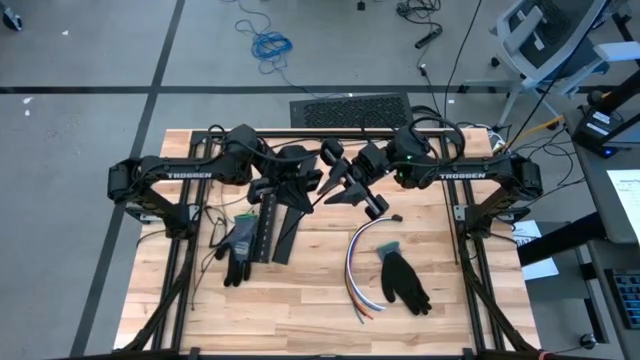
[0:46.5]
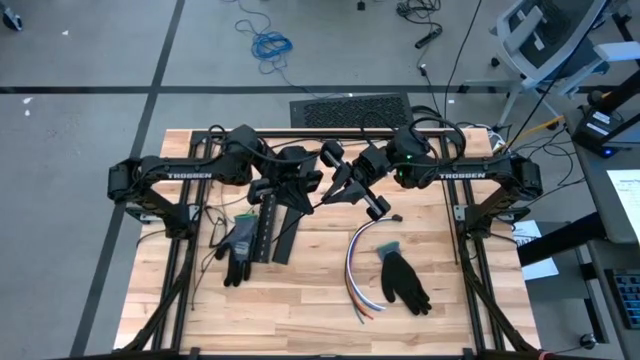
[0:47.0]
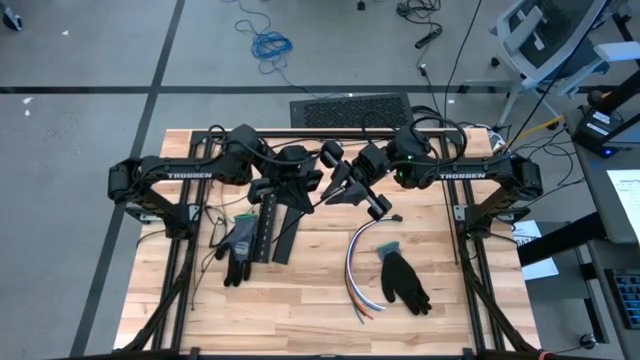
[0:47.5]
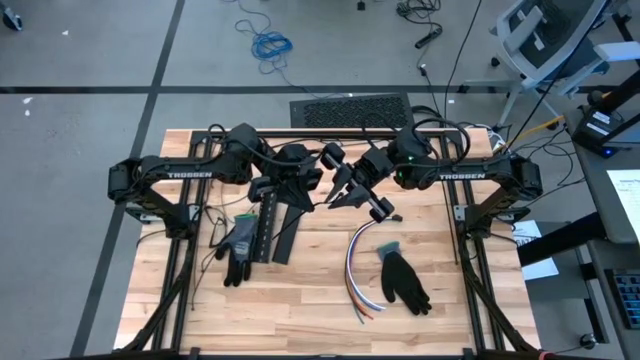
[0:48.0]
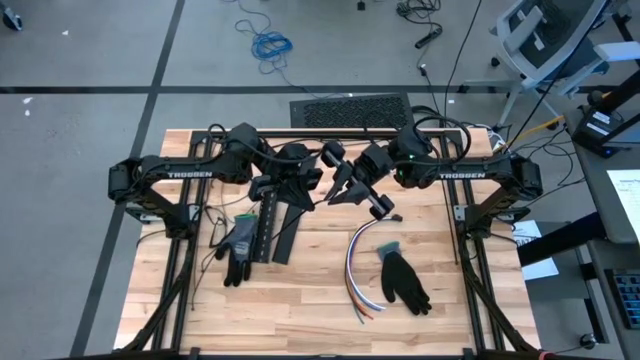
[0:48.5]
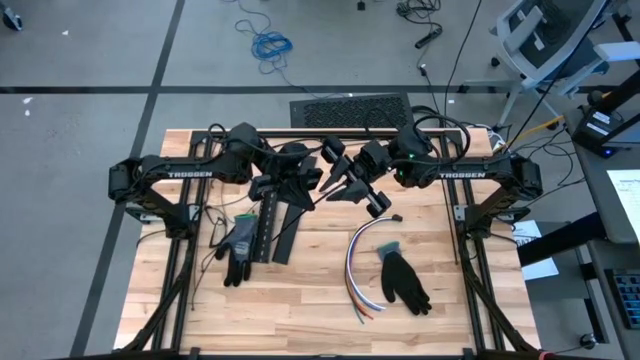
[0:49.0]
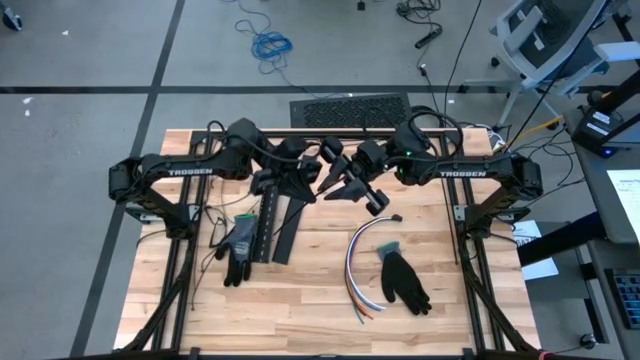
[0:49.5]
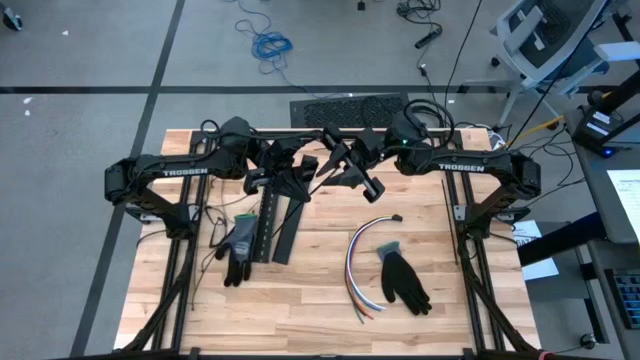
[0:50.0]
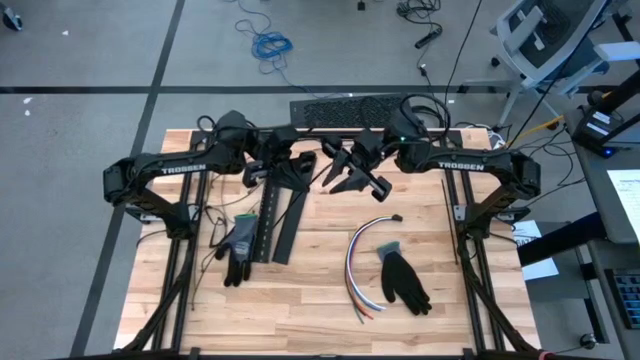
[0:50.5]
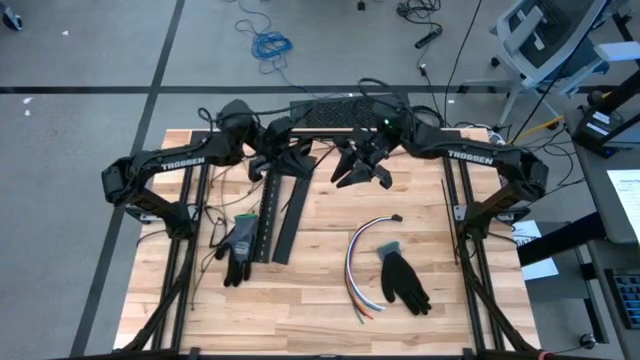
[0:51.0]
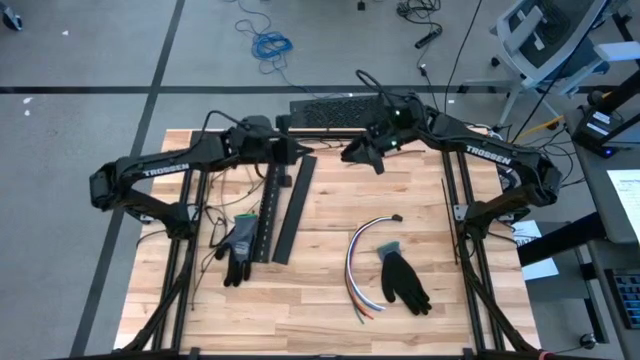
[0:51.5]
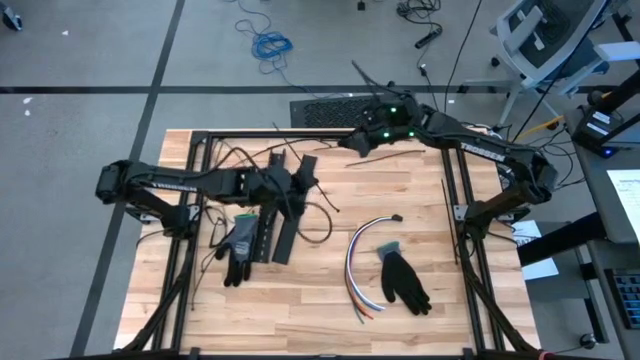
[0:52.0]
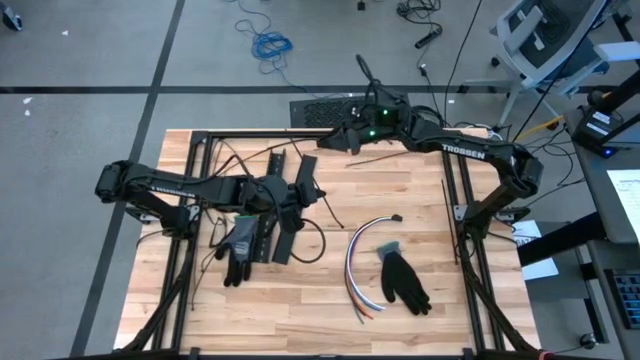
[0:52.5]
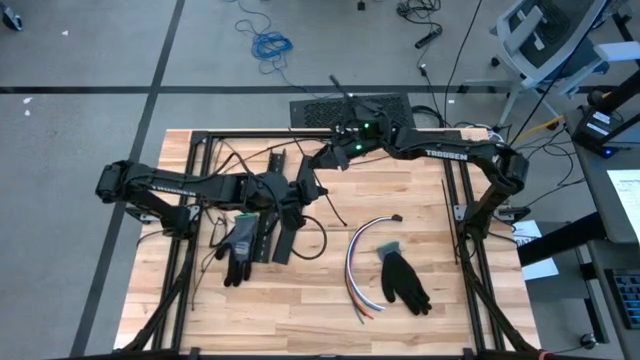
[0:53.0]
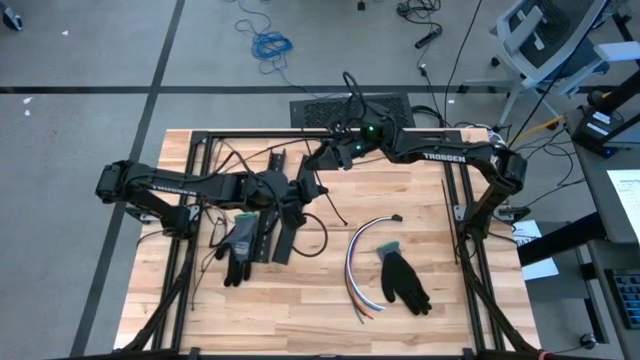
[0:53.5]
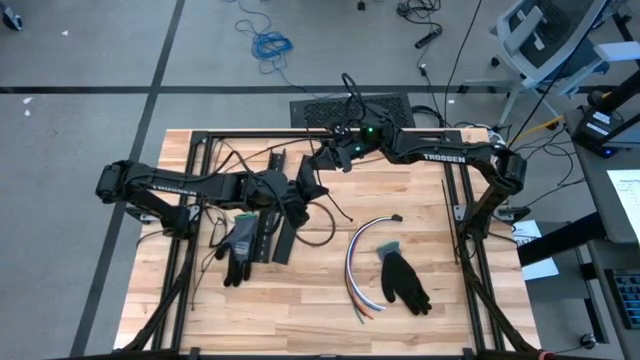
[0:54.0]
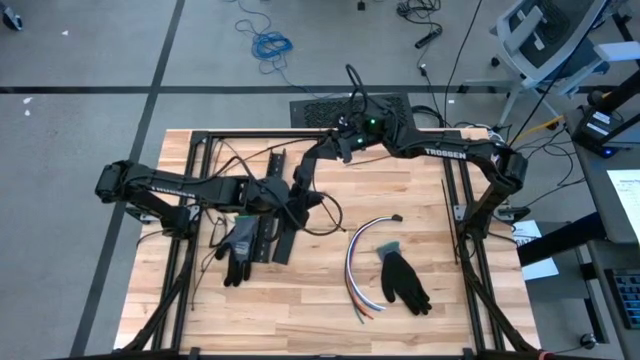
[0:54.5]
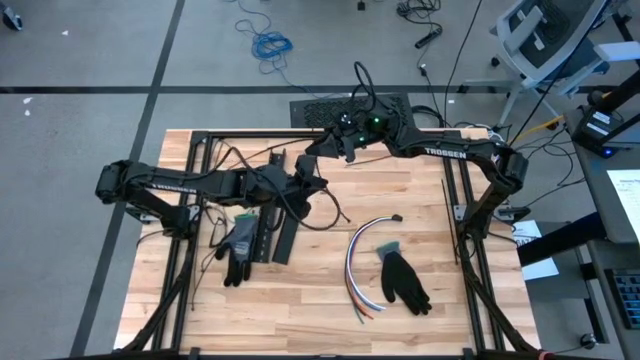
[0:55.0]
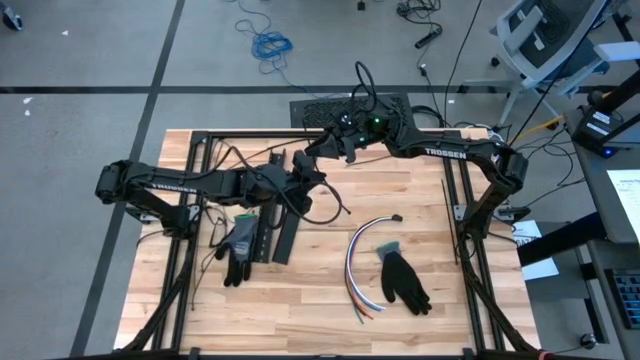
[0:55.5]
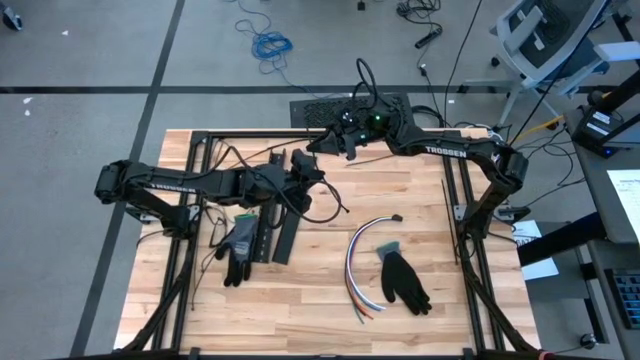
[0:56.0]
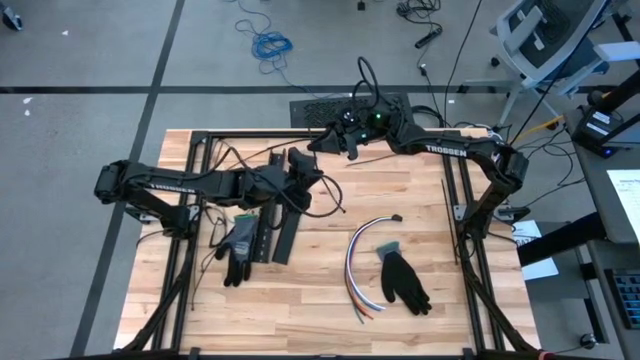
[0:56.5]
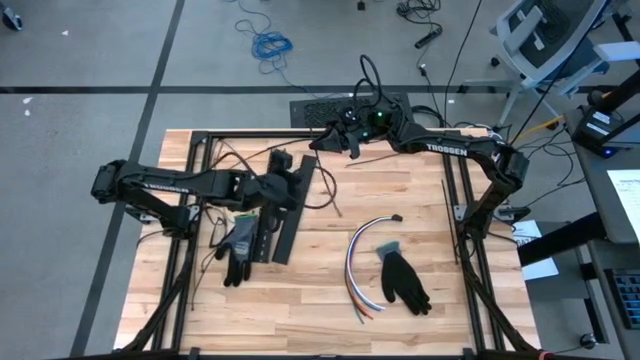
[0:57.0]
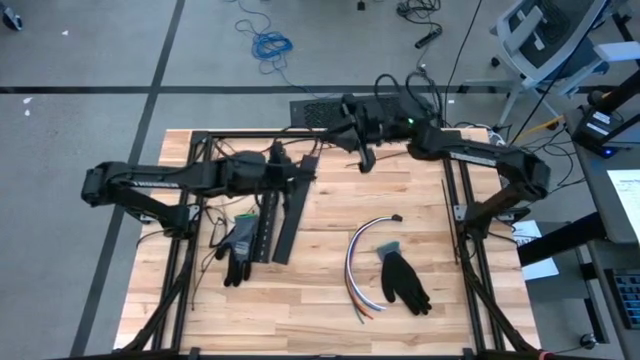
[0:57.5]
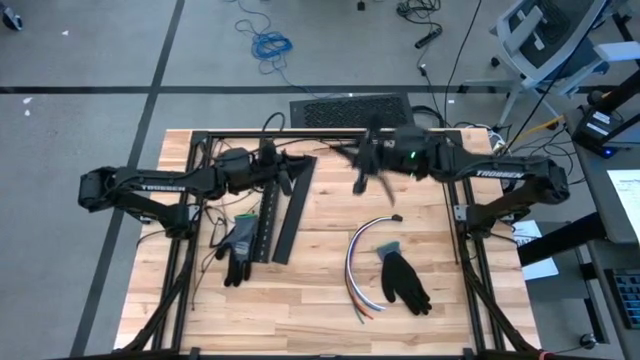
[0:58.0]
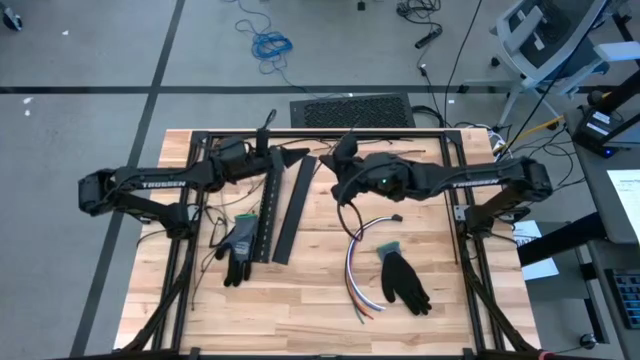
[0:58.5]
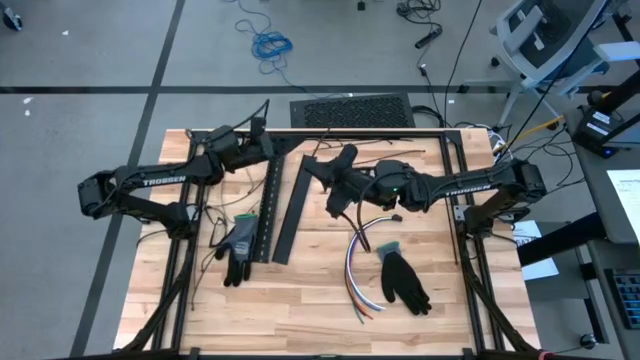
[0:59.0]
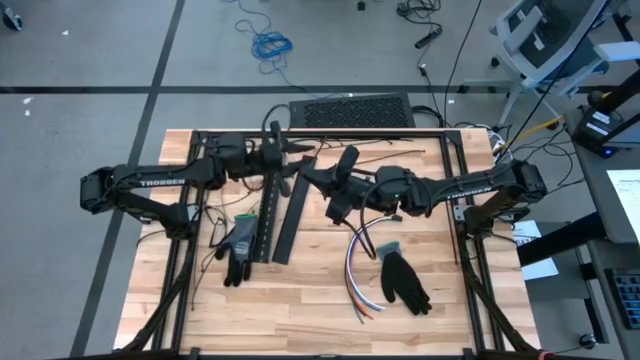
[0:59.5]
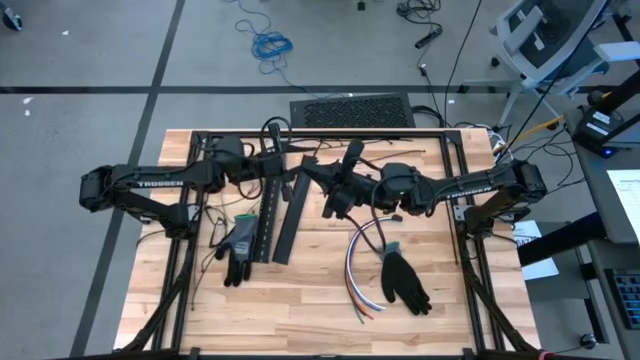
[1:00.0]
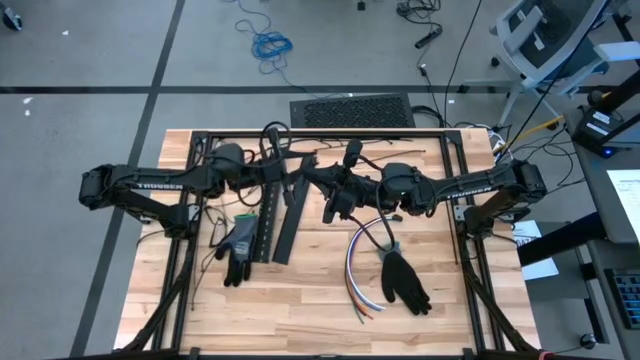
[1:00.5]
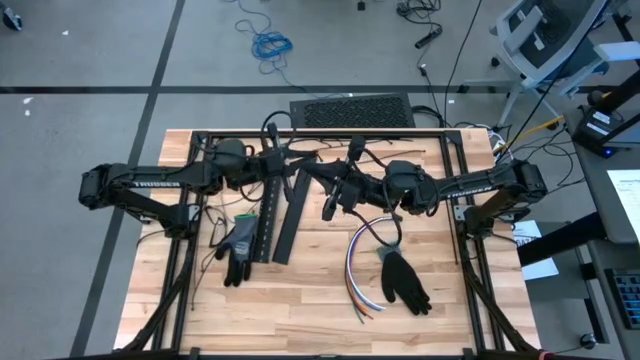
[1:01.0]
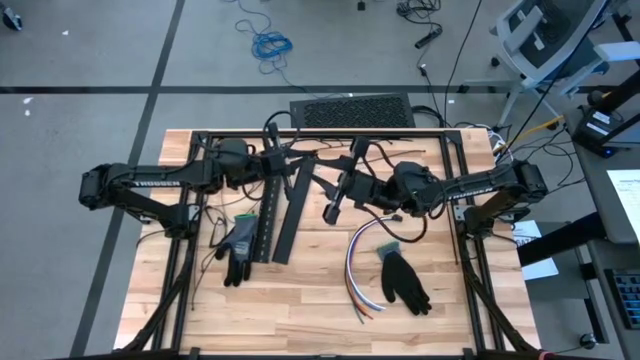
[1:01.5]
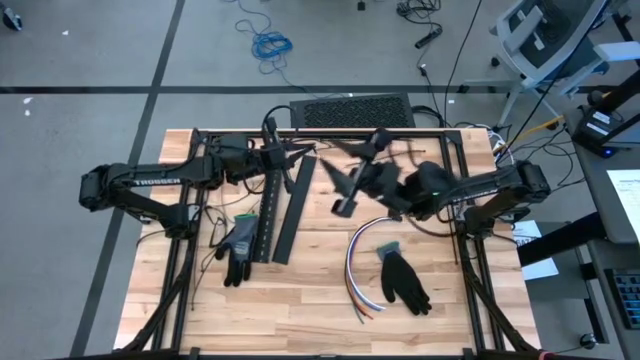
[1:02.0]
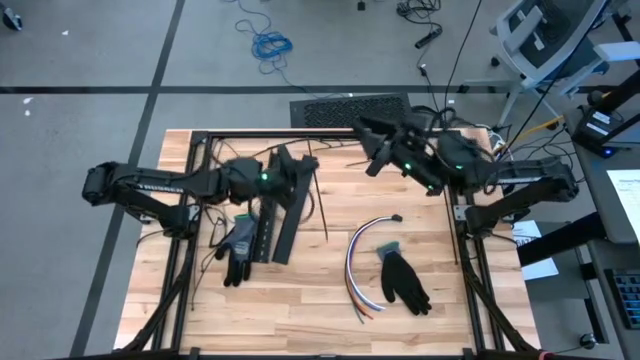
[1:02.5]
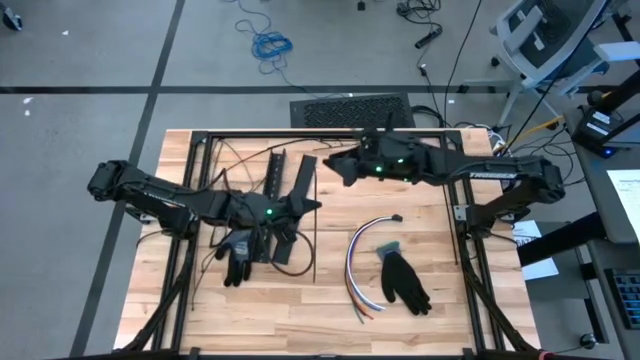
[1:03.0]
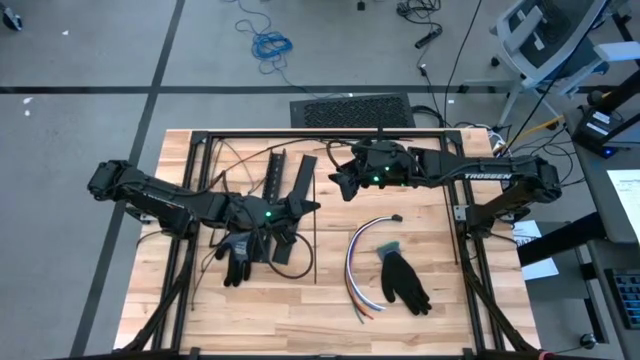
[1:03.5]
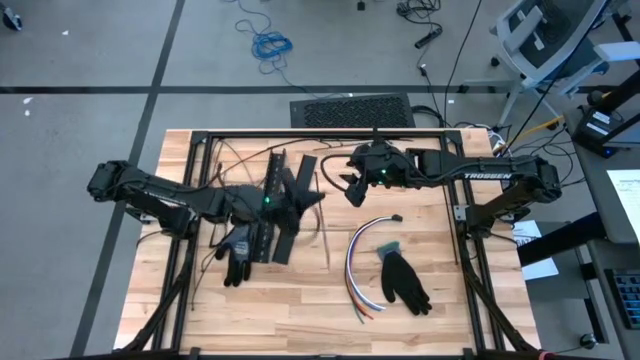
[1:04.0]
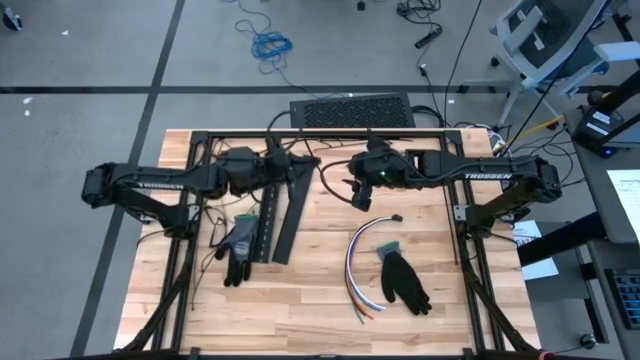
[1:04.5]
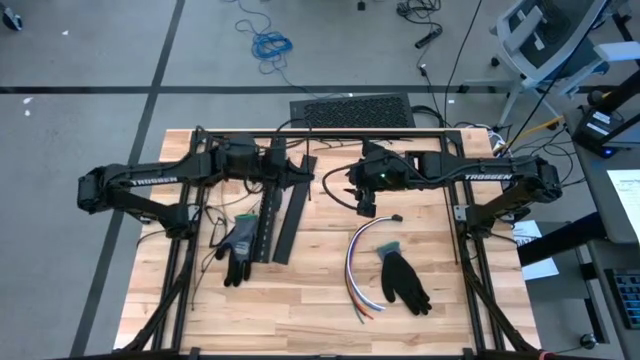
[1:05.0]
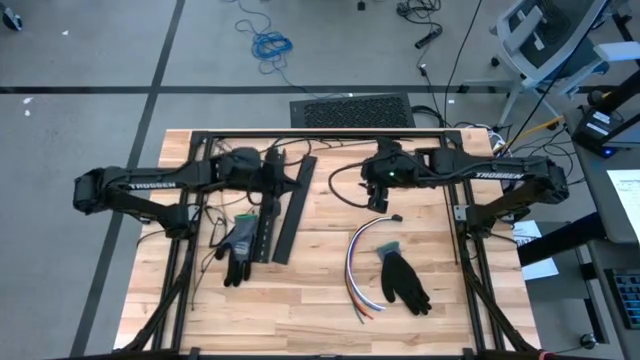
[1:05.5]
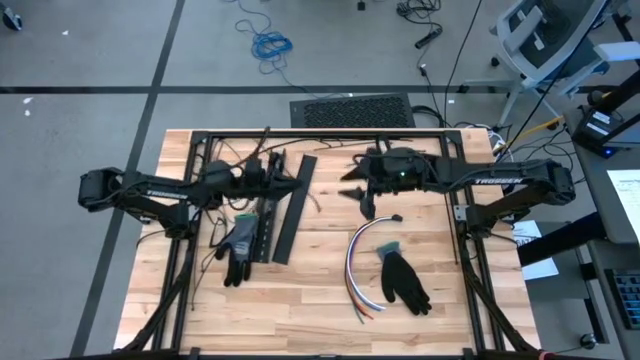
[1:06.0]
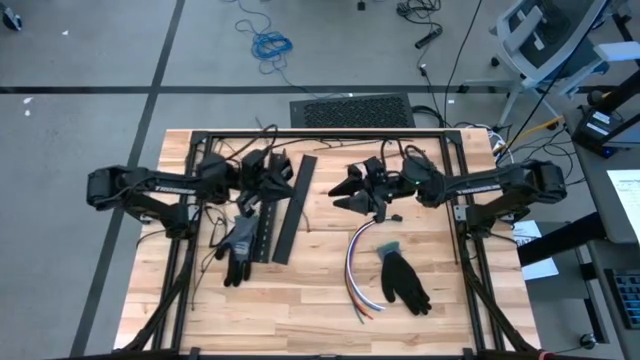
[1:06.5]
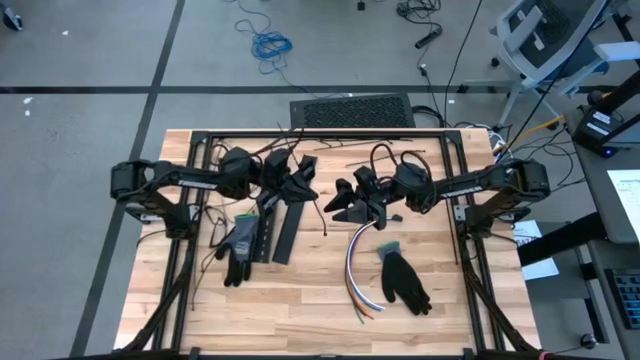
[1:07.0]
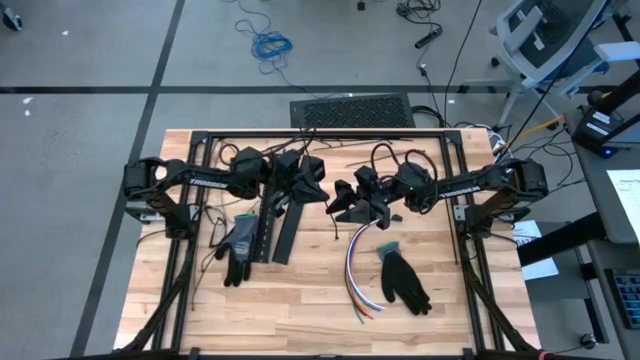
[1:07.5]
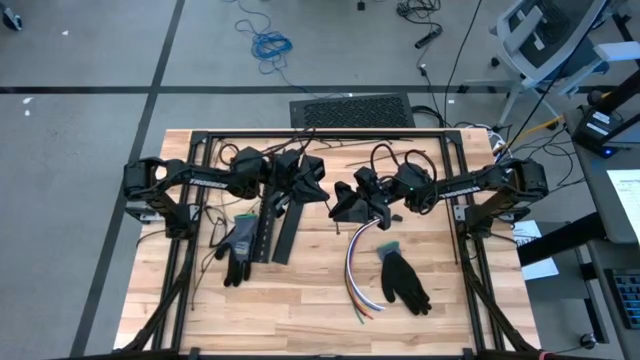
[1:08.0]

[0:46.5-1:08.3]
Task: Ziptie cables
Wrap the cable wires with the black ziptie
